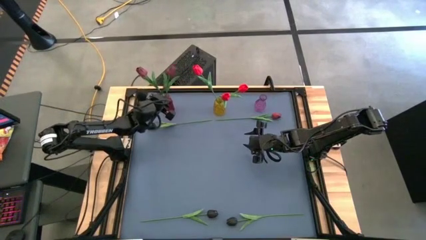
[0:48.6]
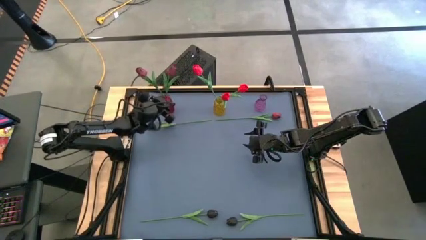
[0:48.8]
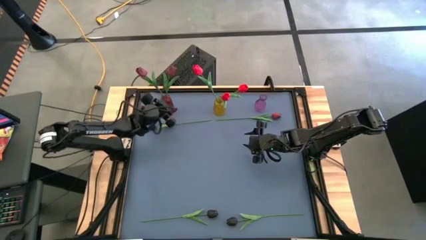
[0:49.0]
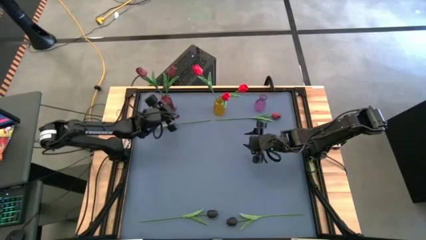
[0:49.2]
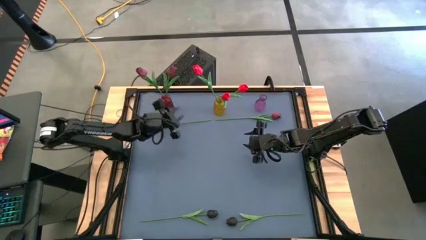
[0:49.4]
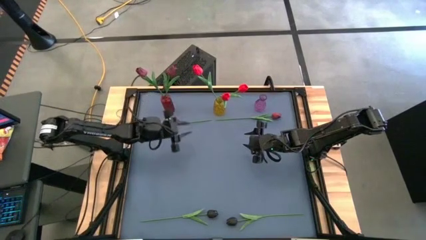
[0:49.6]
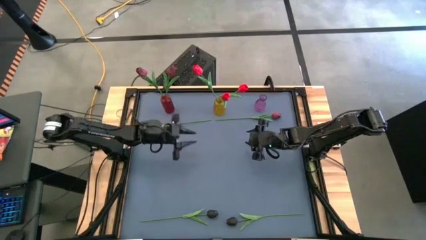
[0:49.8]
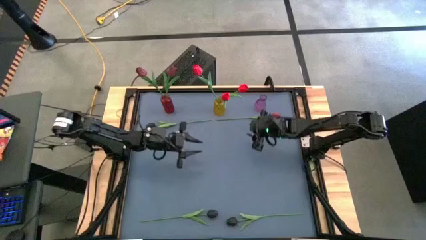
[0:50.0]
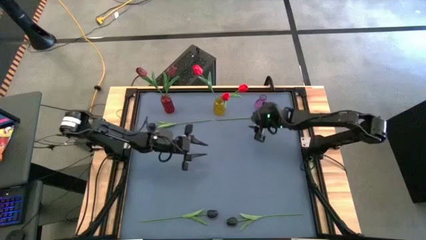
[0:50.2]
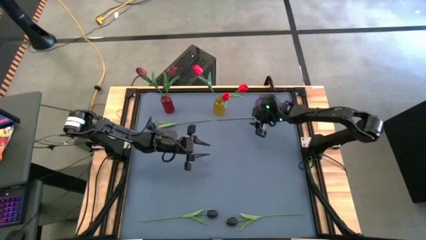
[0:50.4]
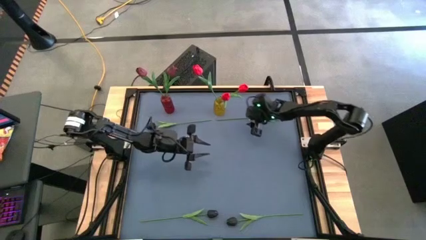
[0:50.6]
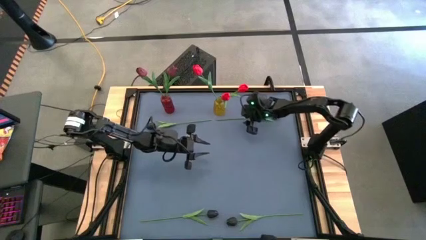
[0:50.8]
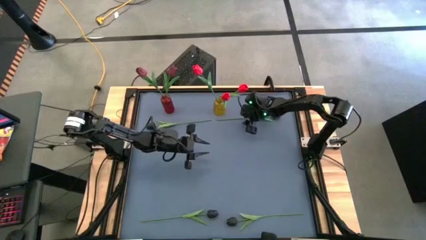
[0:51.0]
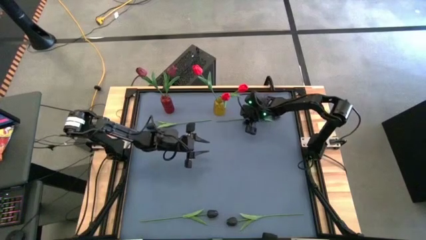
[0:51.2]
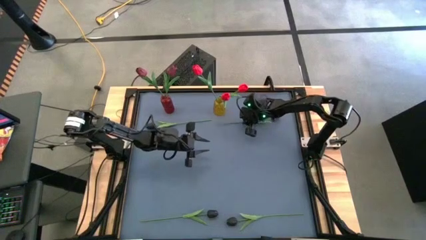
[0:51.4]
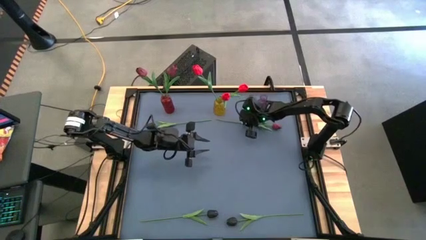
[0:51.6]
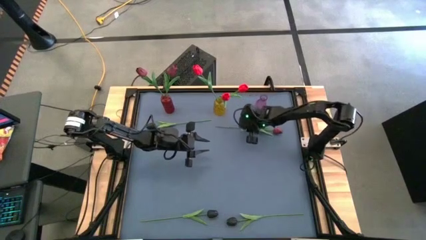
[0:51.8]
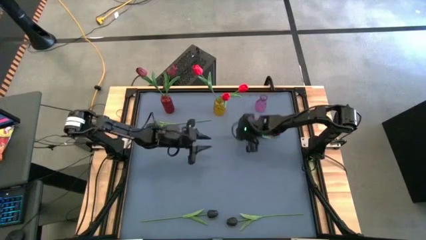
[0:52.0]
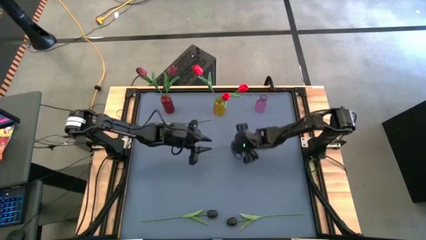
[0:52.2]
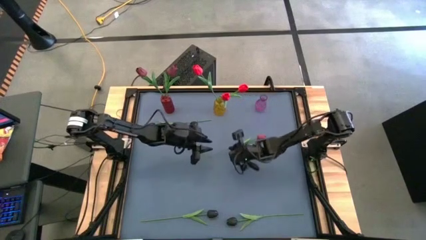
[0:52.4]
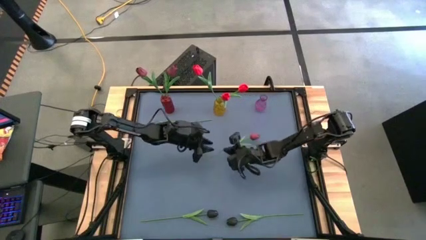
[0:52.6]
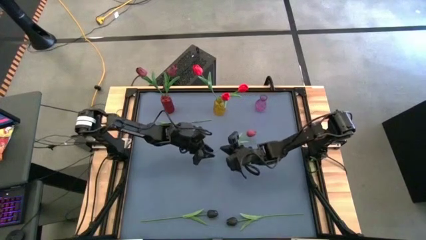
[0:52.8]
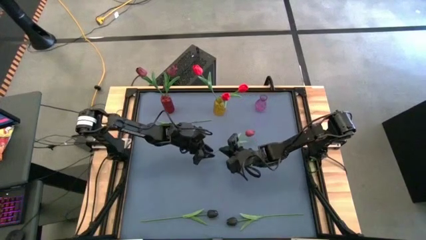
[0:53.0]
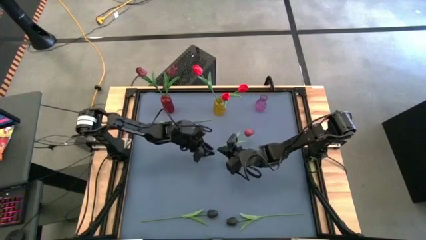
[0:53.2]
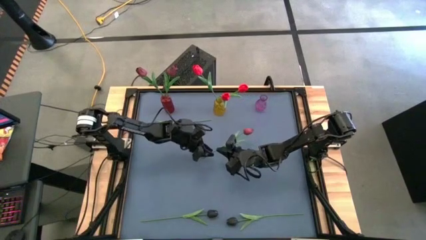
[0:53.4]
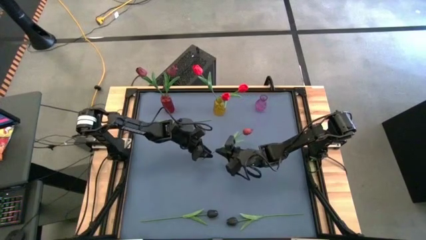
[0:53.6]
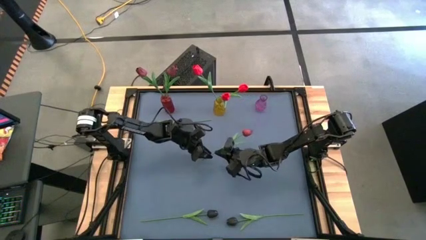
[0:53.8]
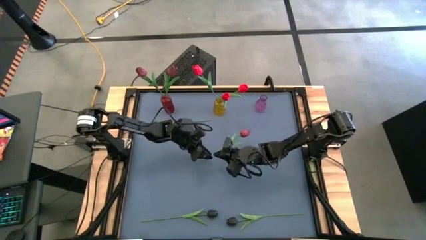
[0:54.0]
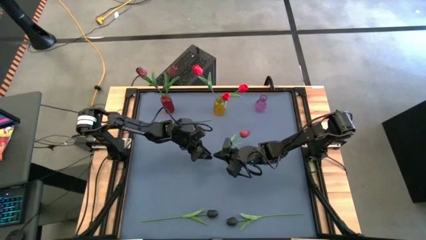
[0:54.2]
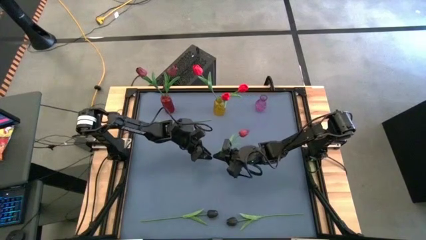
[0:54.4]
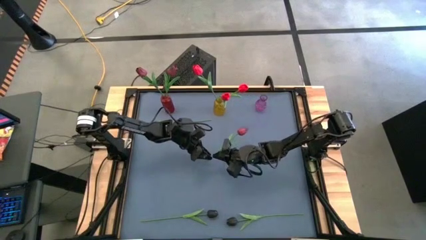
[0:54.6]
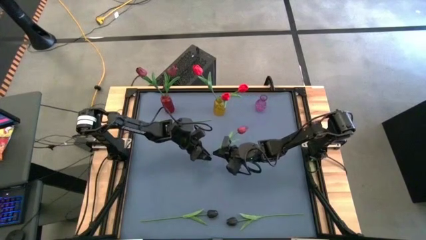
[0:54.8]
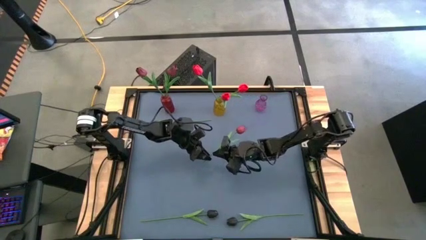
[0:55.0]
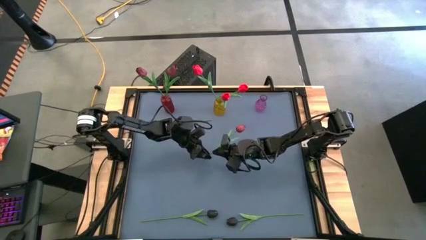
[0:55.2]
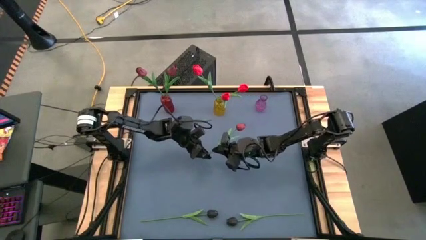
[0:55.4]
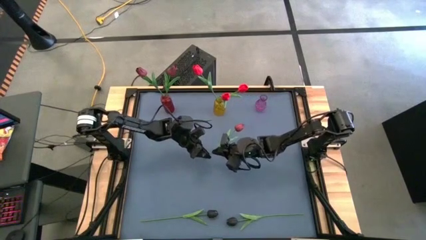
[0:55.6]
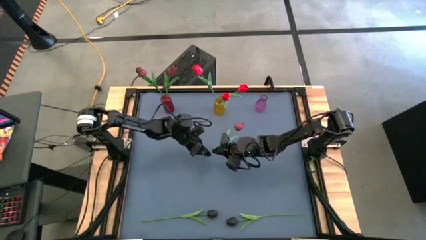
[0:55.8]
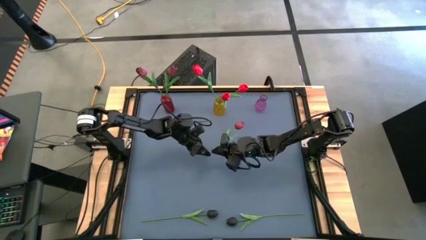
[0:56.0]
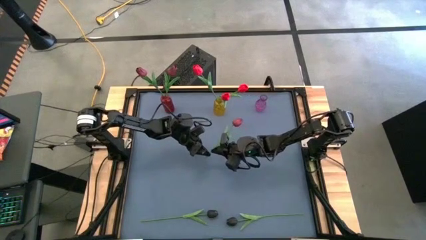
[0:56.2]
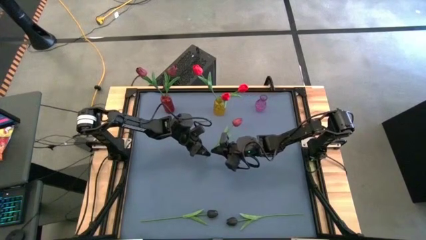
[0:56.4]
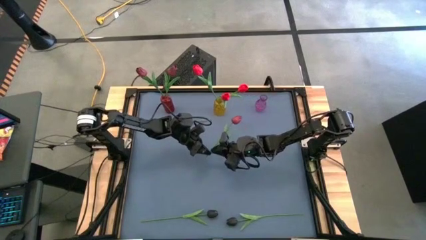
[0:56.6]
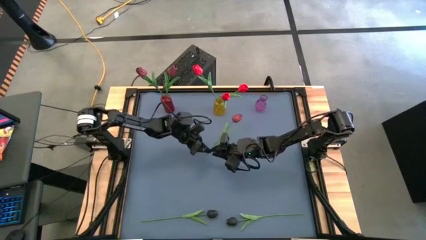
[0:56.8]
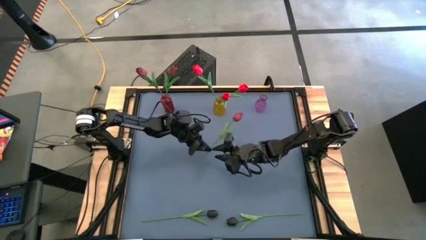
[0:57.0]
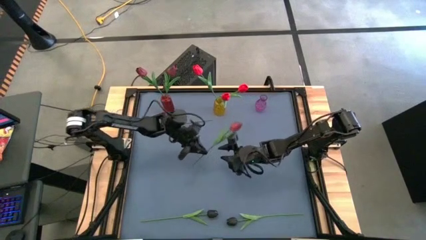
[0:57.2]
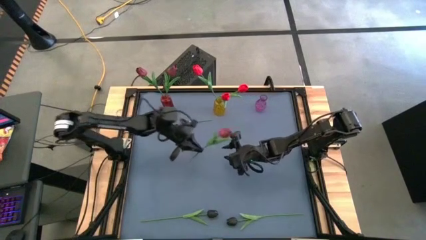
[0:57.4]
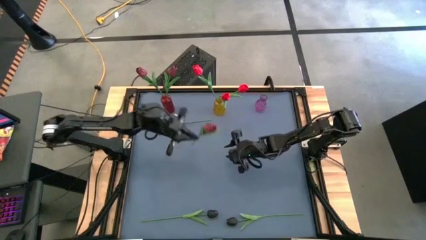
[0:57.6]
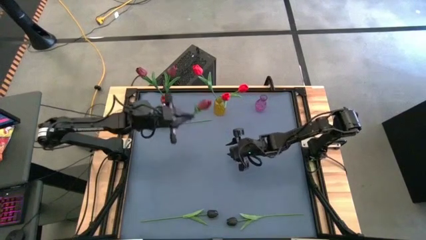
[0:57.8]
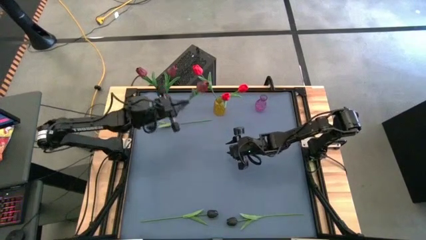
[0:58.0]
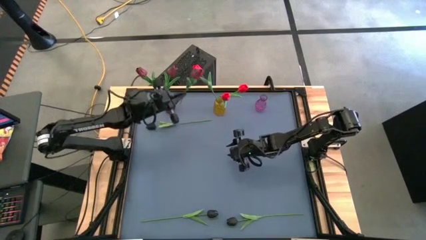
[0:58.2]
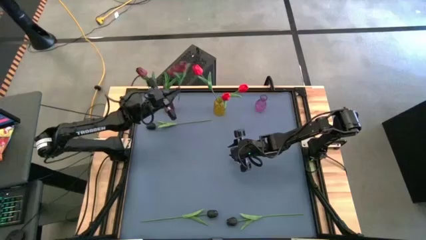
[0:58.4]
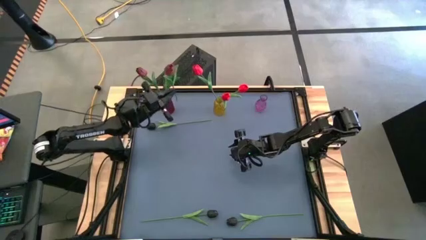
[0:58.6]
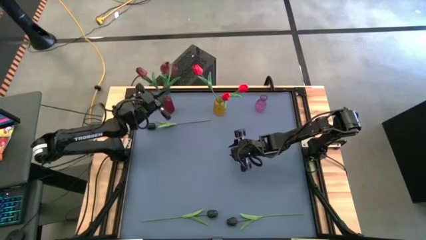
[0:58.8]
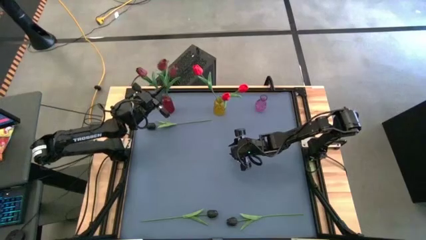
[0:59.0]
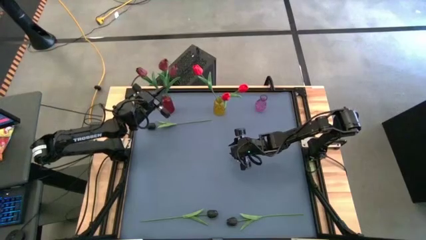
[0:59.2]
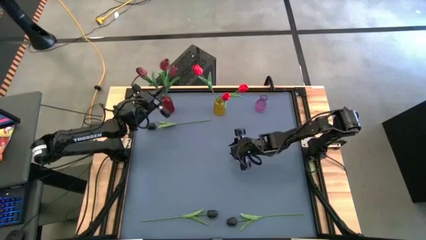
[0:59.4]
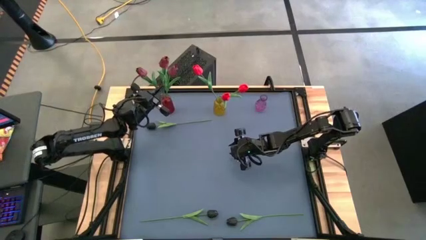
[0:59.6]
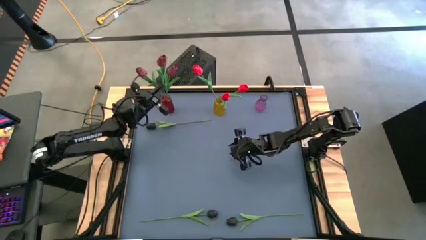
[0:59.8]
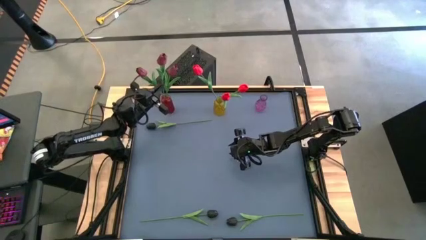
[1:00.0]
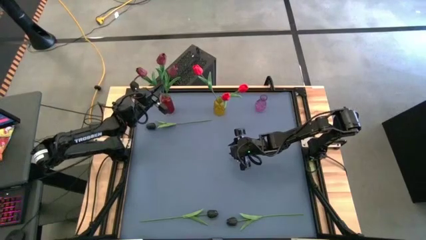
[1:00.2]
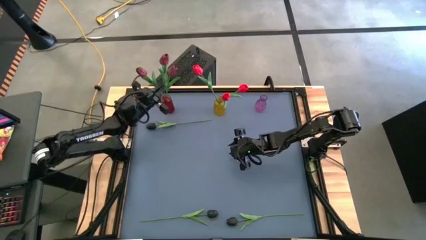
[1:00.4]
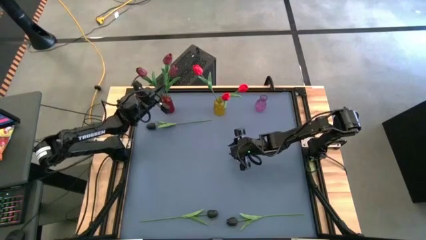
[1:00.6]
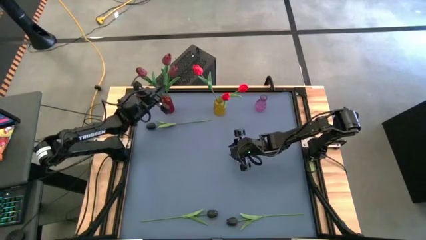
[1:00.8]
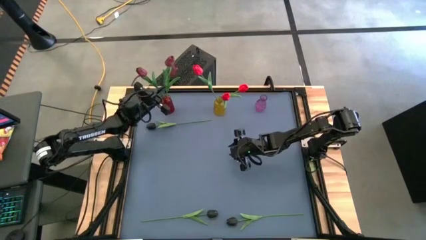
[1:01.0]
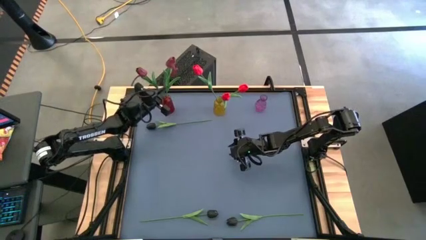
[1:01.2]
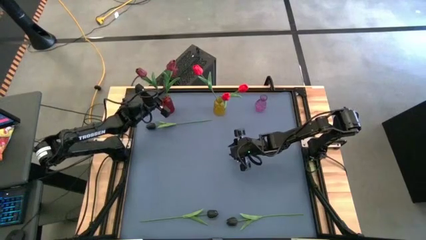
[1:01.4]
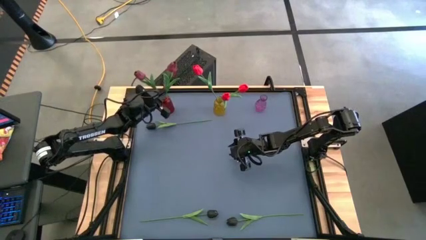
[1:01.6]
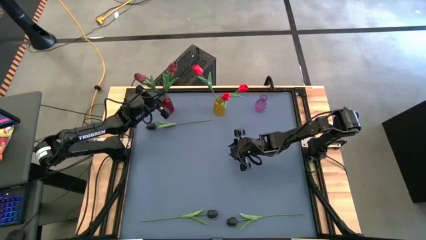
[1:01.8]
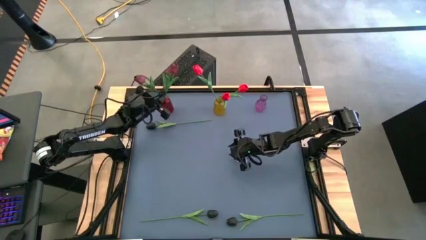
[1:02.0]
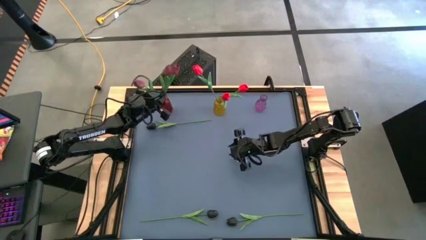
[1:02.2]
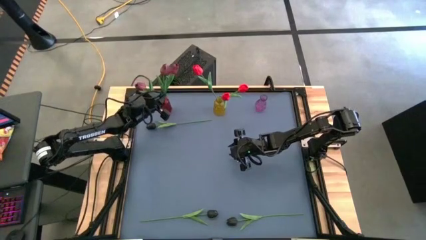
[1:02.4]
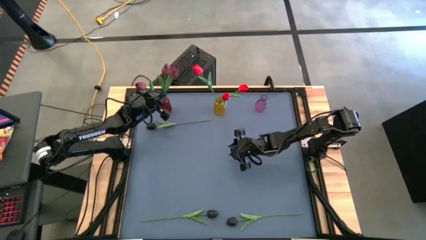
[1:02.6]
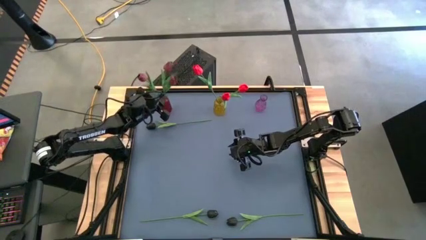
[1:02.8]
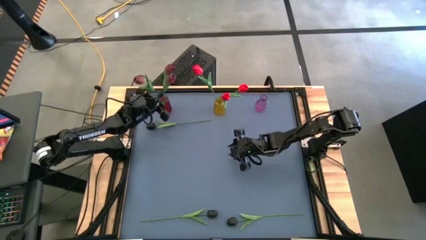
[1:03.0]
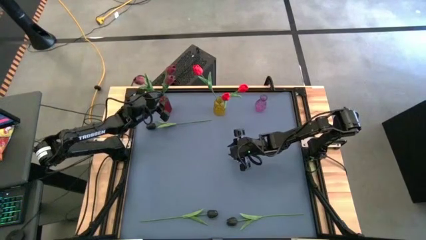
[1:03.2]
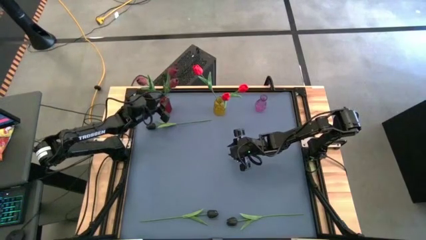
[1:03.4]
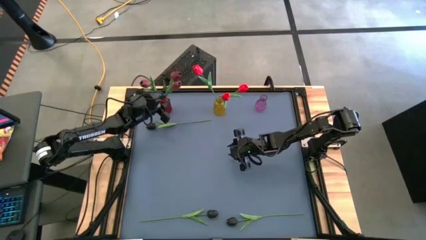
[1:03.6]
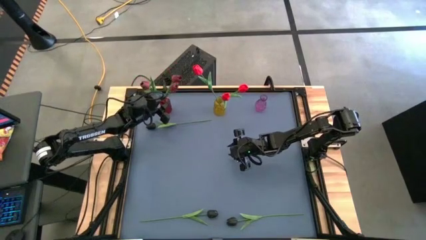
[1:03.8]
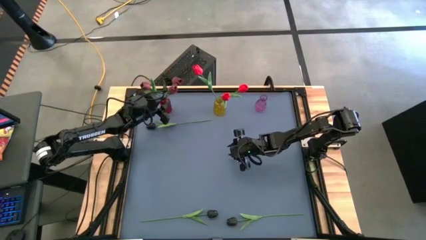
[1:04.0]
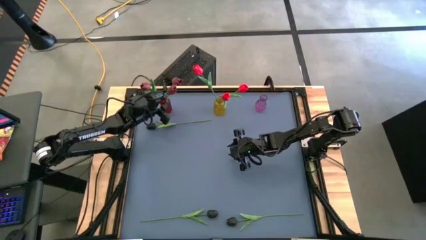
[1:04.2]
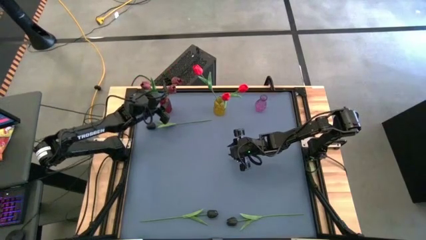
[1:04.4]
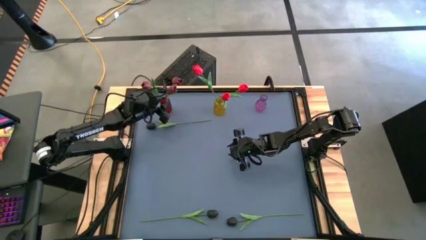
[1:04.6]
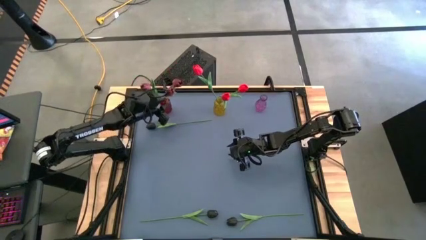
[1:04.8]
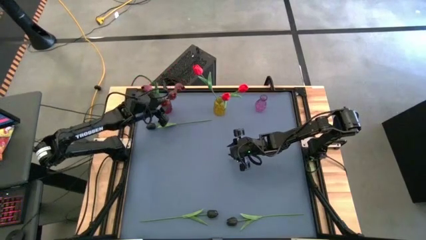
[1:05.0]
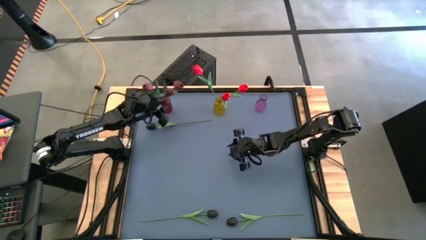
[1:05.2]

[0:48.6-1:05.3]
Task: Sort flowers into vase by color
Put the dark red tulip into the red vase
